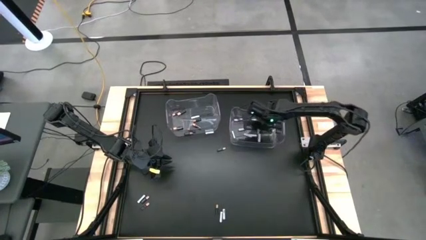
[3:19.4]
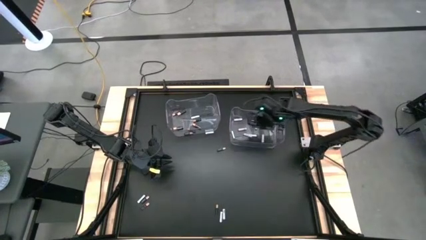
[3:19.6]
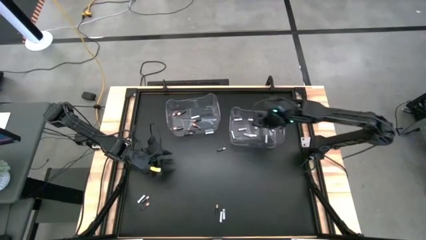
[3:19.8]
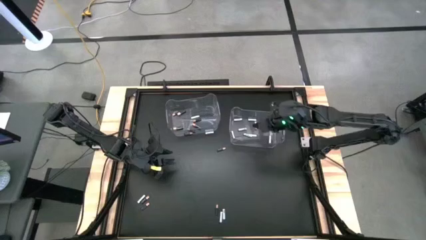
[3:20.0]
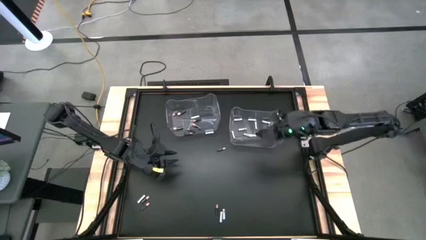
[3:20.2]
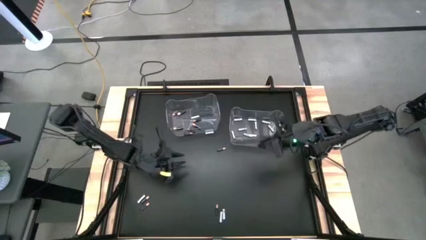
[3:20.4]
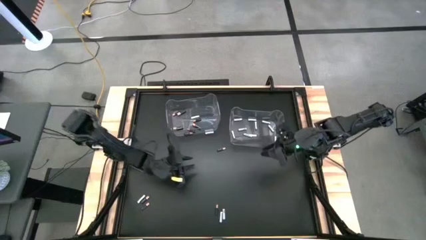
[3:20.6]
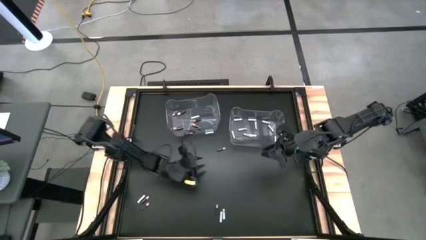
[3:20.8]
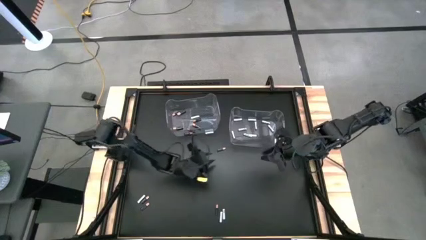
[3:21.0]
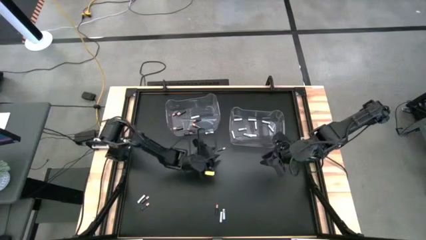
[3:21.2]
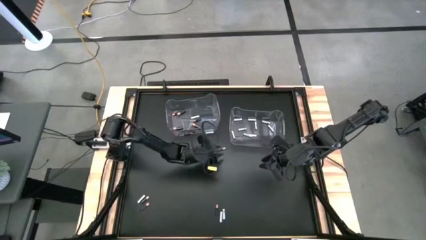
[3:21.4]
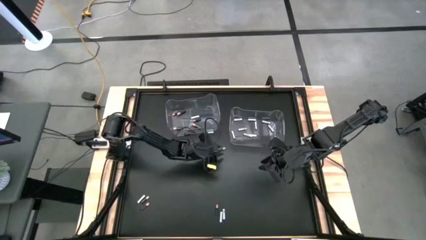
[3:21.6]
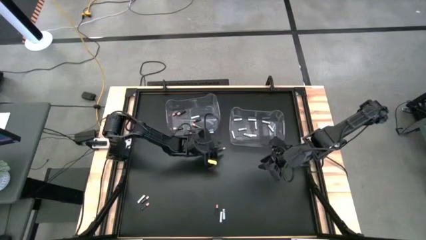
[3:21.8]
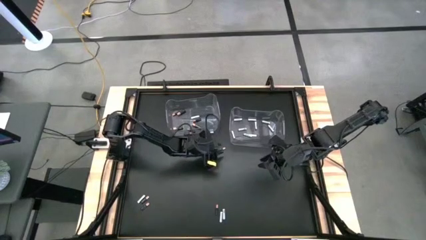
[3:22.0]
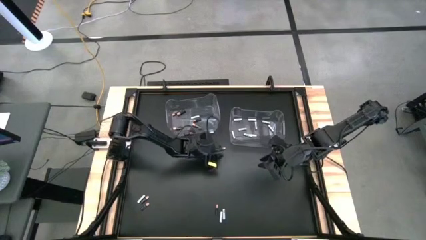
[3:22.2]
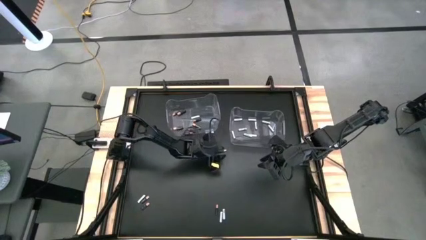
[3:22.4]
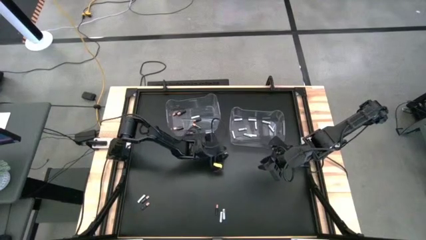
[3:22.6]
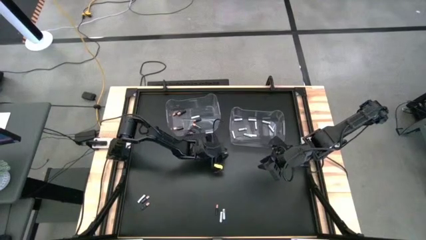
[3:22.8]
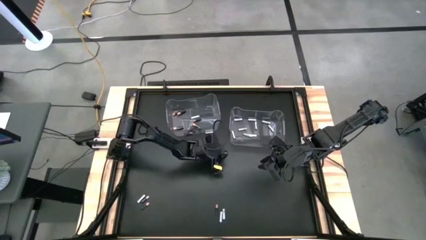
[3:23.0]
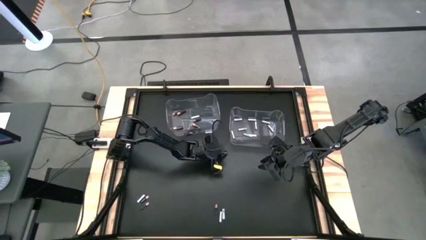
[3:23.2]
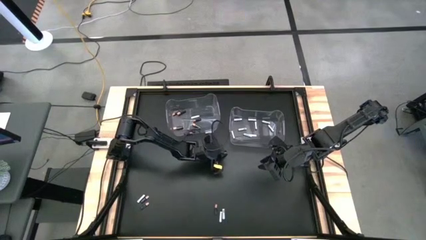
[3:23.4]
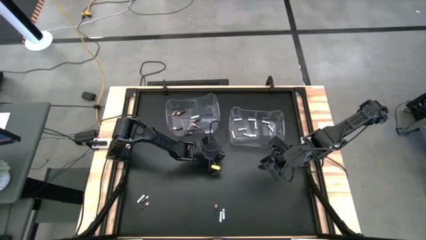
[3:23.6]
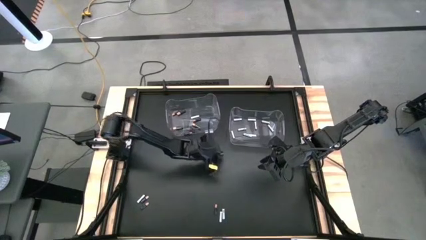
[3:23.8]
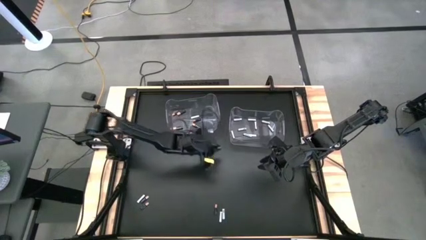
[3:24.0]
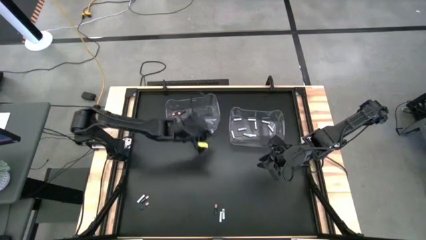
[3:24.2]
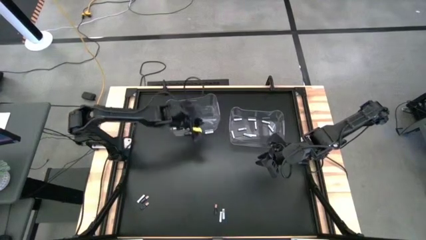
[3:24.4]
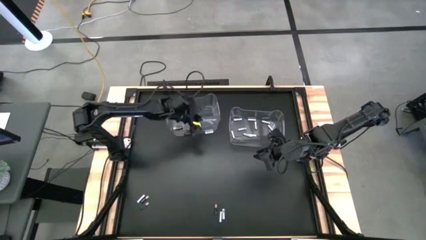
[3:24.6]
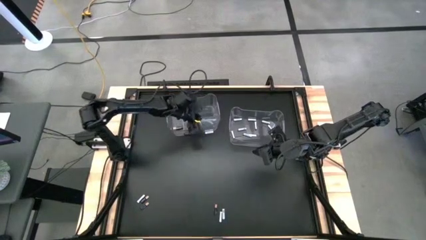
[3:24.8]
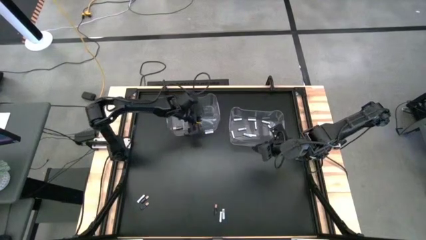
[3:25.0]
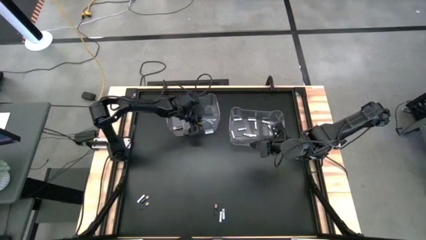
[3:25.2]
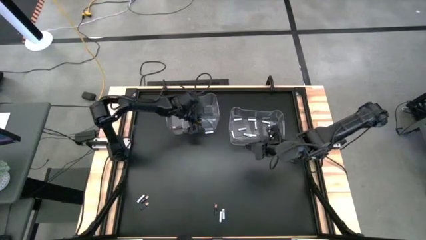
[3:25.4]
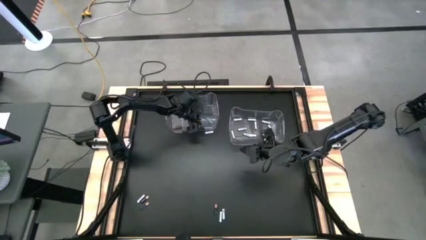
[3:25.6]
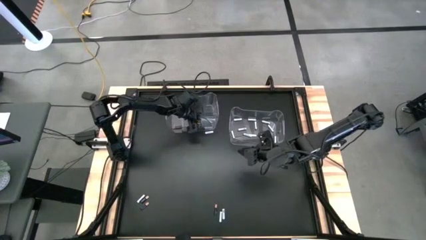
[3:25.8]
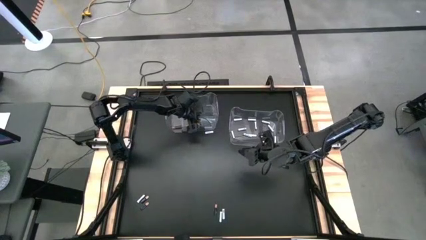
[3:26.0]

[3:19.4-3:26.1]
Task: Sort batteries
Put the black battery into the left transparent bin

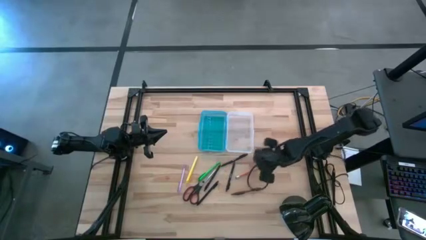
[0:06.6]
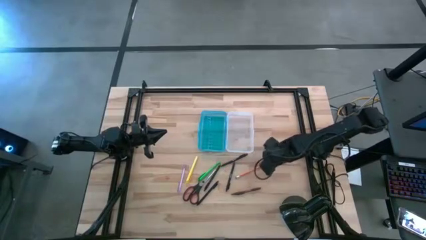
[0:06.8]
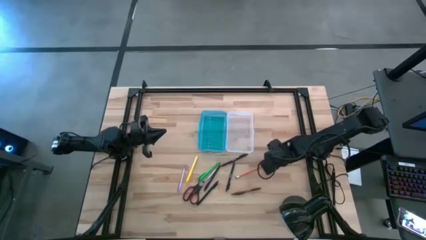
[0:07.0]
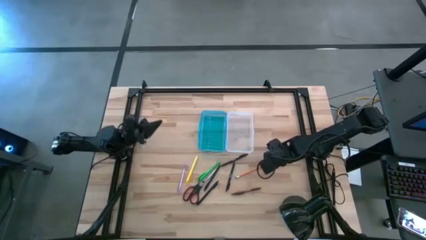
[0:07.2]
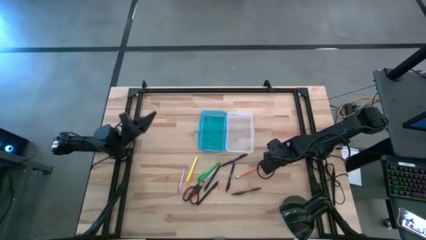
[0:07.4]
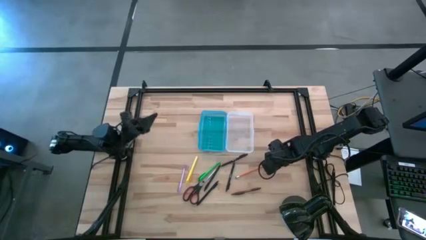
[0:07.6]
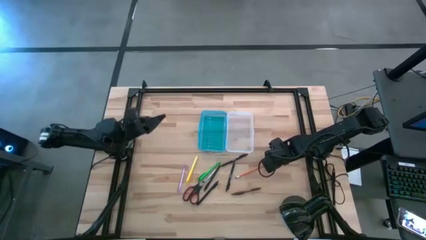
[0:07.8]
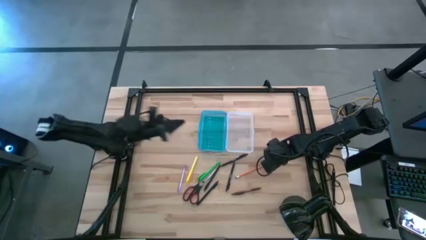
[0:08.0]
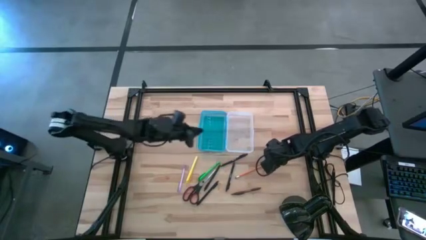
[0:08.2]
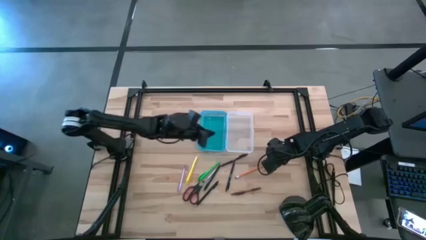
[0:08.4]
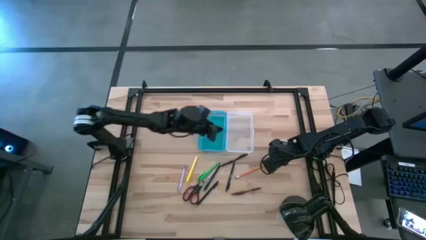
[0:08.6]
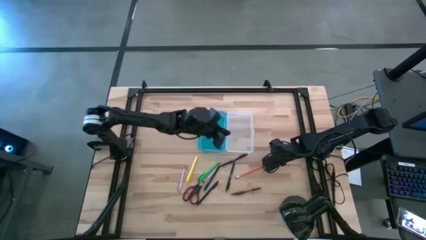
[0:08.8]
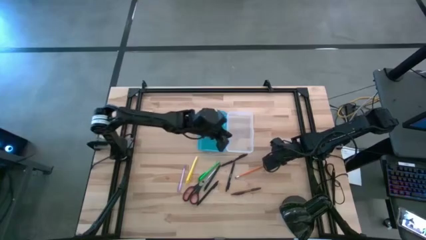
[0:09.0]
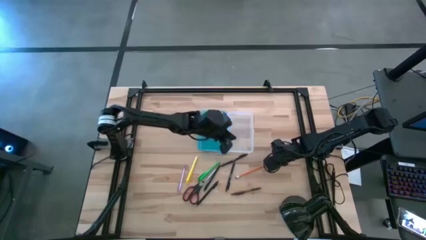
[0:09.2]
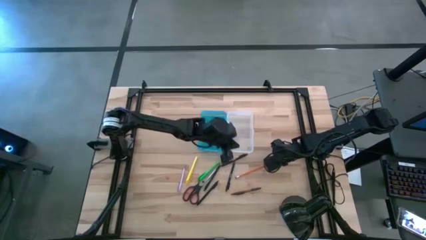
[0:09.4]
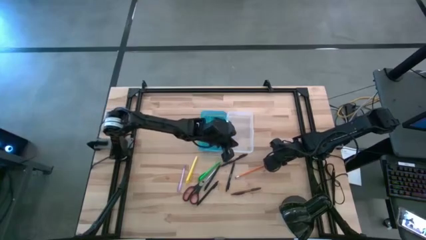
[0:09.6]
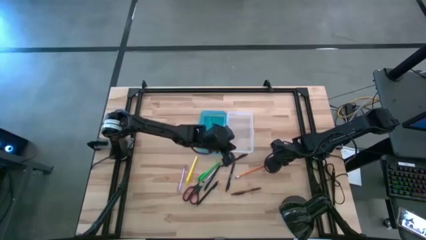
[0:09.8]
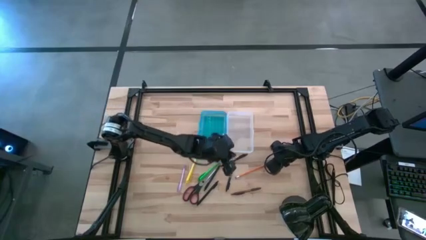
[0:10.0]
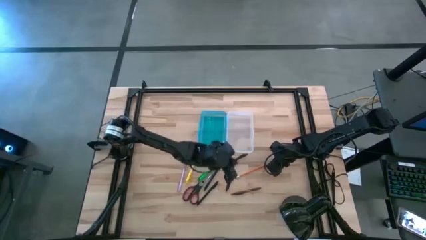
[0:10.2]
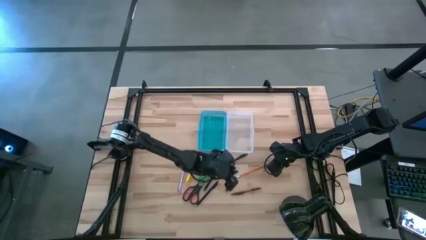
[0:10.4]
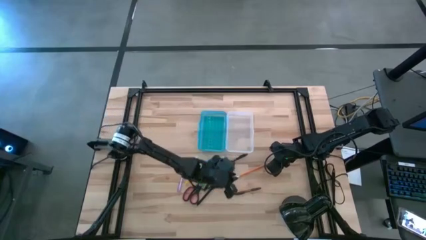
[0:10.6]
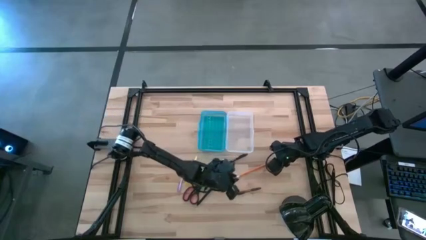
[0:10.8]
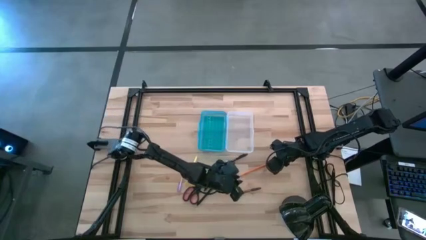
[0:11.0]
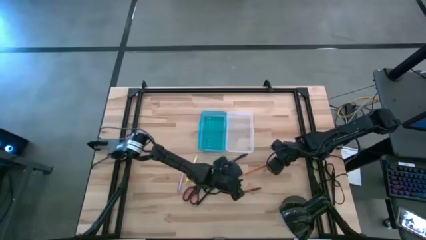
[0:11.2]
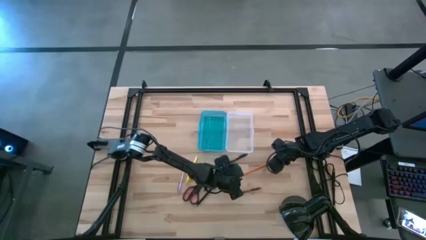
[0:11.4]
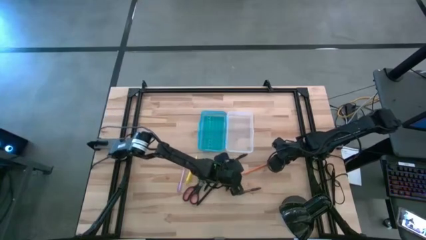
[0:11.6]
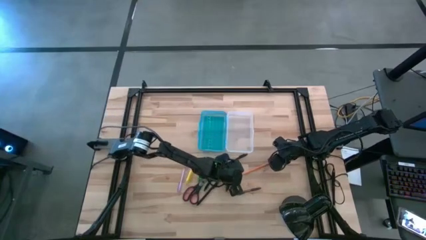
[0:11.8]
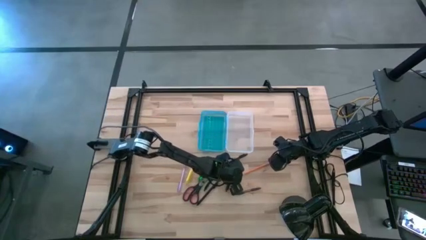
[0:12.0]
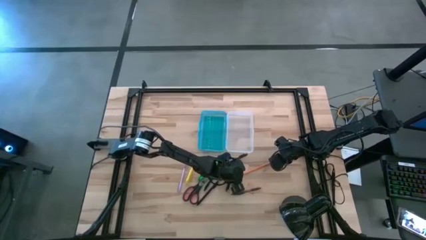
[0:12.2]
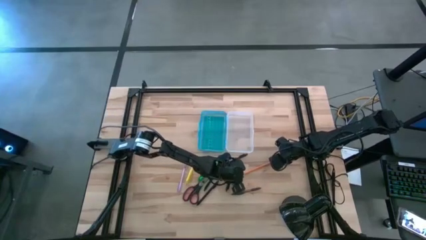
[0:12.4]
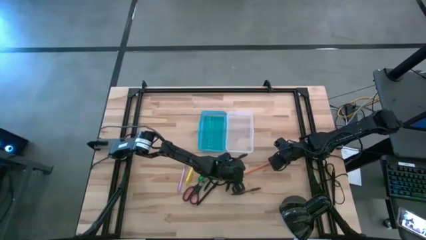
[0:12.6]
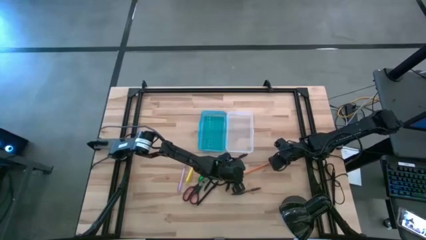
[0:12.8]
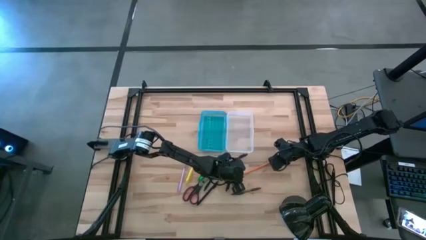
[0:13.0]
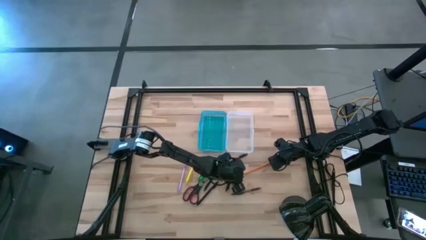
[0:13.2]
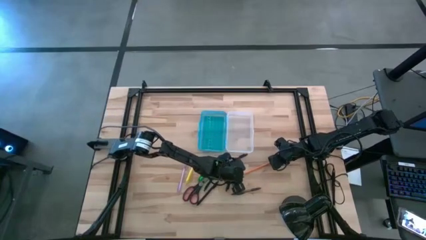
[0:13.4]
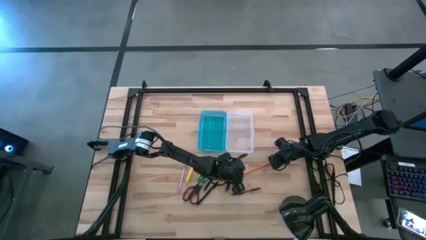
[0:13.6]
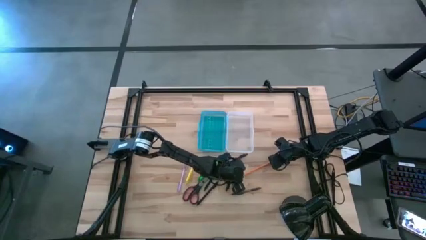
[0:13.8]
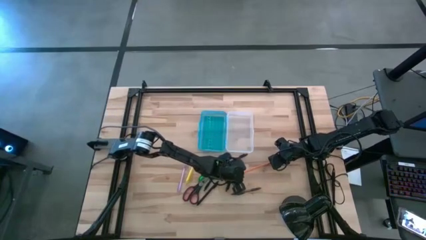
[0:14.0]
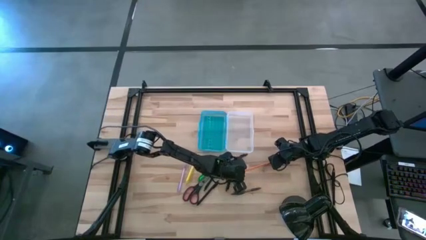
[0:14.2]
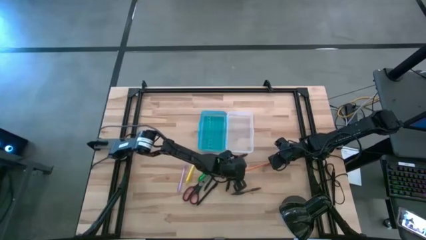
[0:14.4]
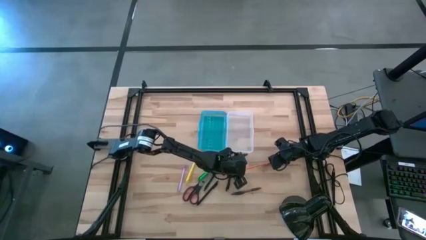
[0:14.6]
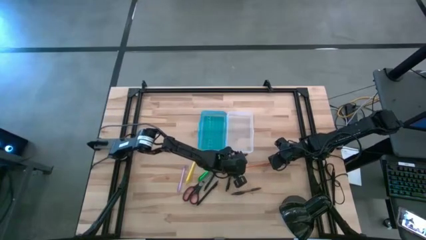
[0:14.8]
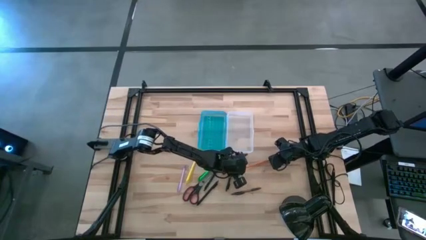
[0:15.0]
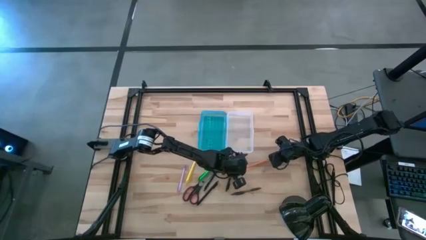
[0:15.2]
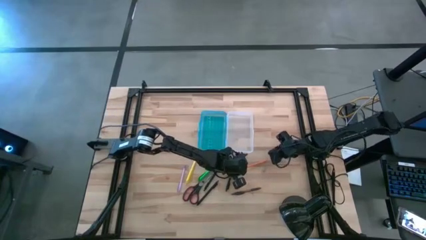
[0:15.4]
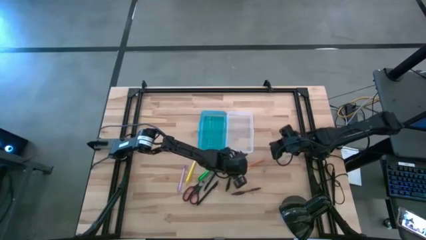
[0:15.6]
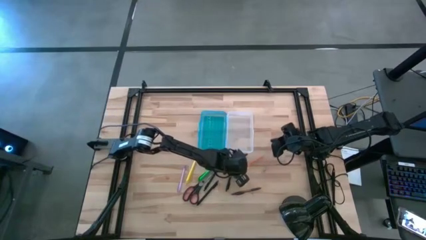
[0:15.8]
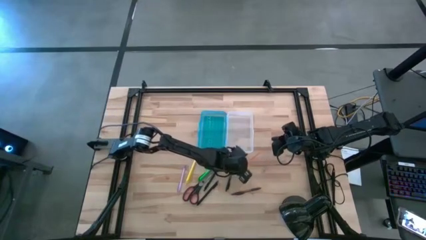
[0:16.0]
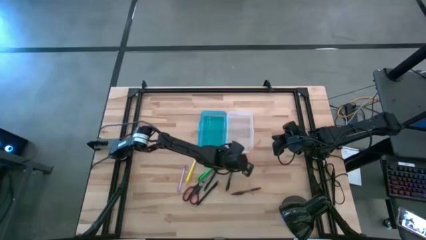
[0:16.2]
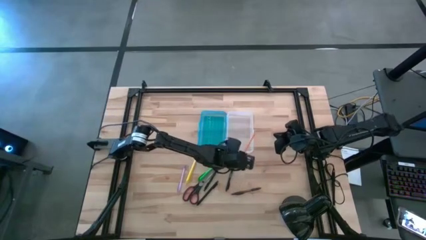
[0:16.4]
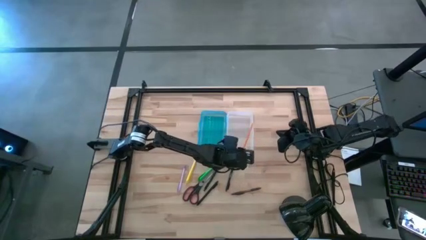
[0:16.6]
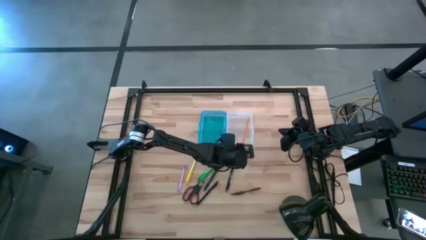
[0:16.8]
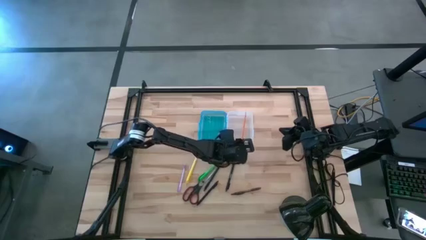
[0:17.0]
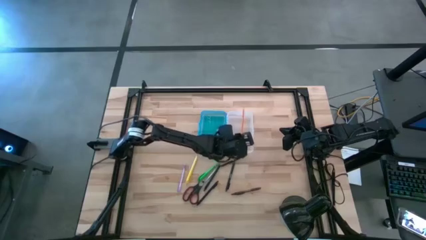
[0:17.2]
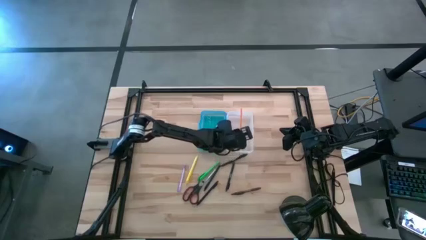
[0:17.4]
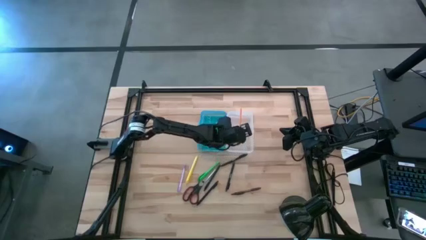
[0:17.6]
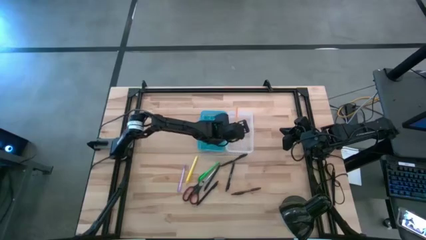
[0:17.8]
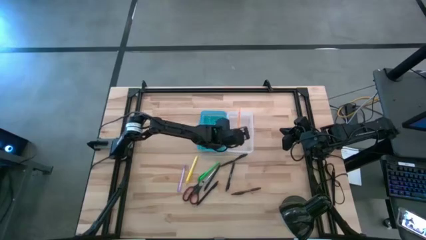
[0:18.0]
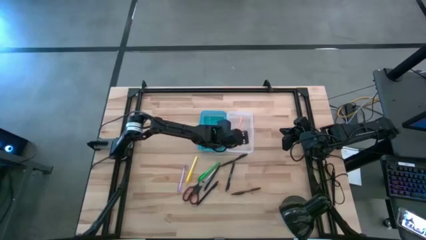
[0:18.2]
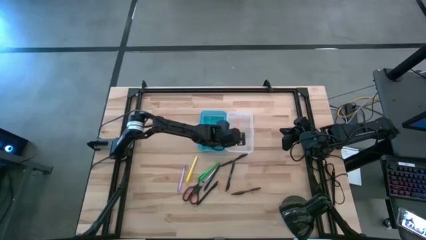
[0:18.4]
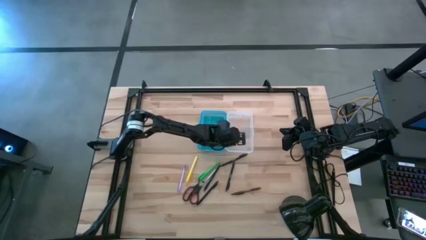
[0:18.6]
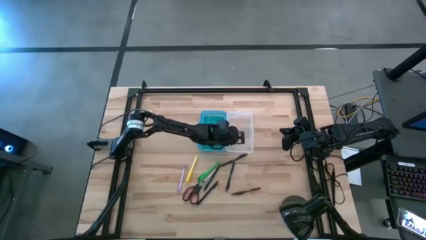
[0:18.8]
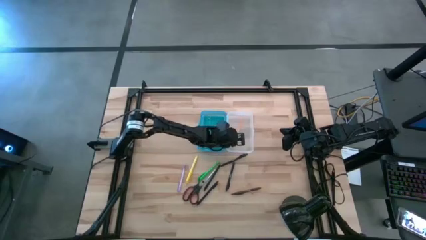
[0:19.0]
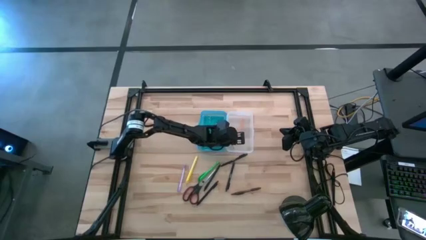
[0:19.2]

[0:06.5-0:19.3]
Task: Pick & place school supplies into a supply box
Put the yellow pencil into the supply box
